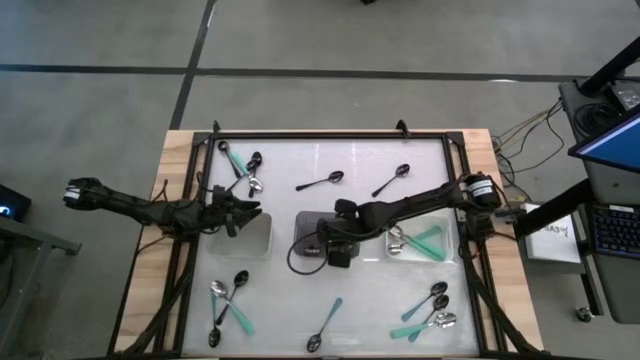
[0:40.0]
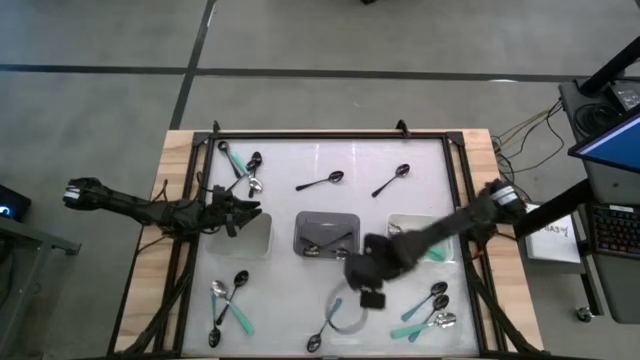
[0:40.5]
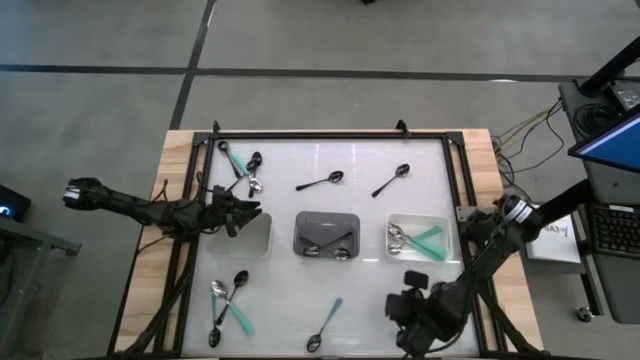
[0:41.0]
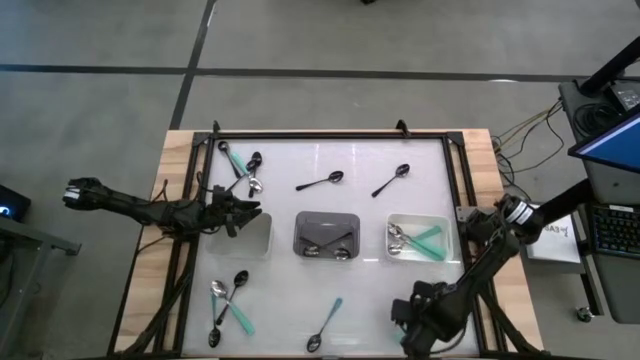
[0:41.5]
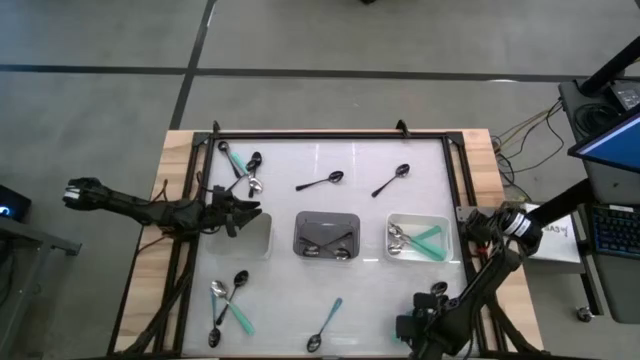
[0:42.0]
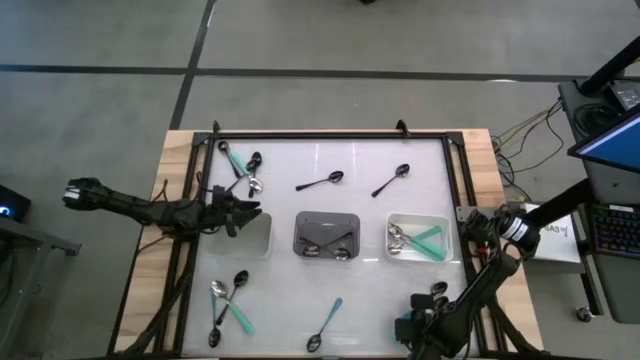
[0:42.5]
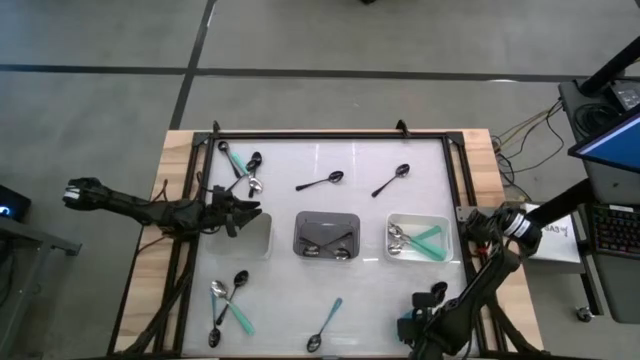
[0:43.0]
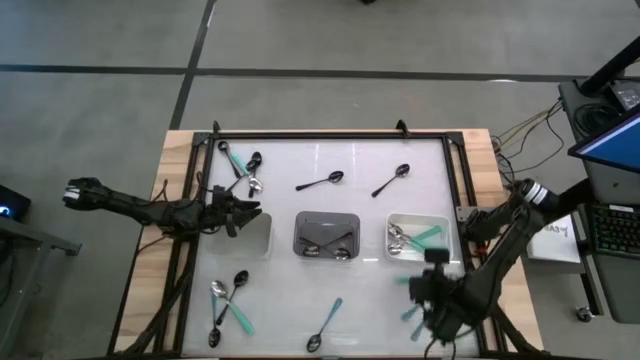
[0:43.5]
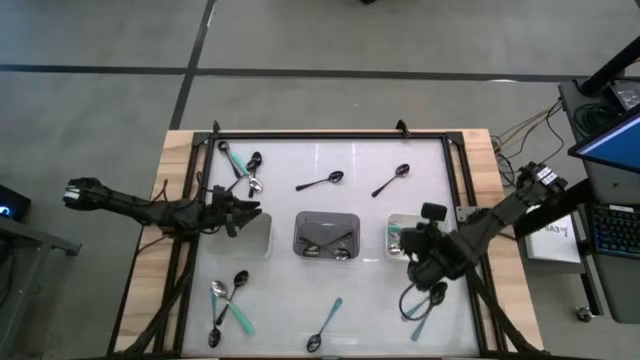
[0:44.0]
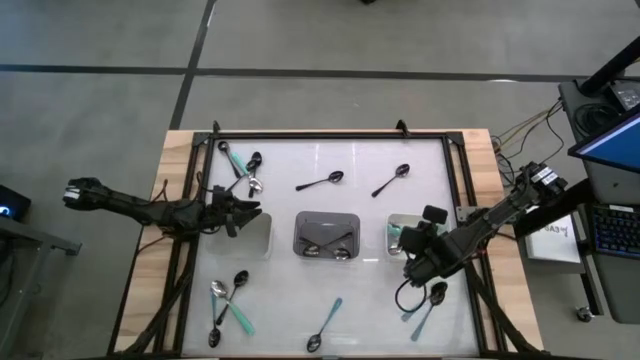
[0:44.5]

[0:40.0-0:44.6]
Task: Sort silverware by color (type)
Put the green spoon into the white

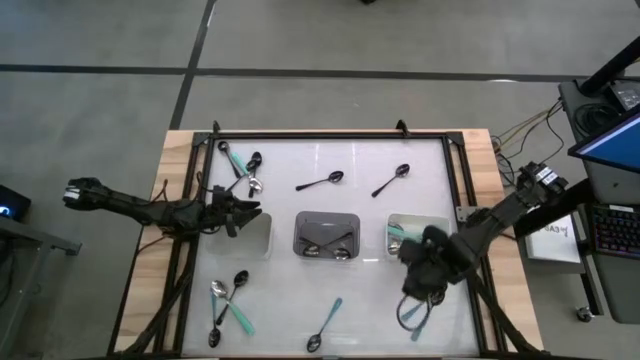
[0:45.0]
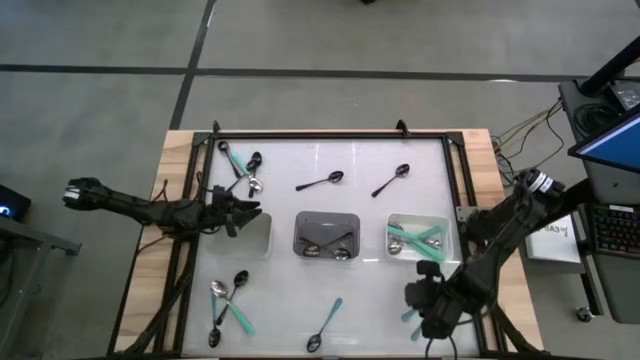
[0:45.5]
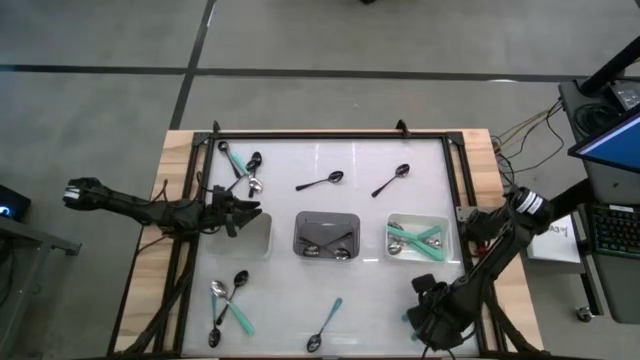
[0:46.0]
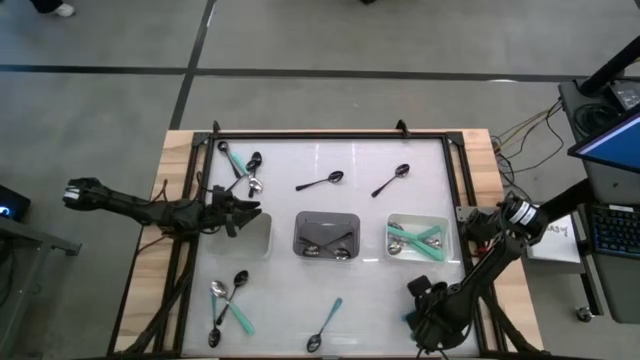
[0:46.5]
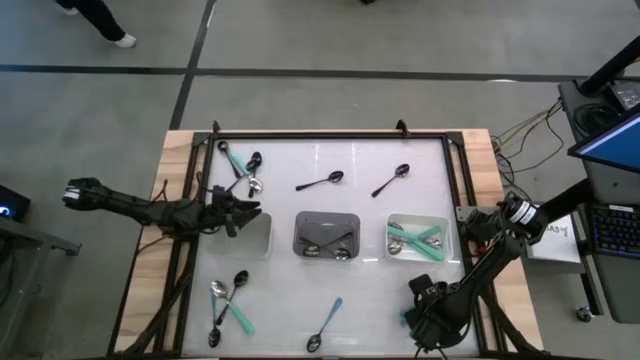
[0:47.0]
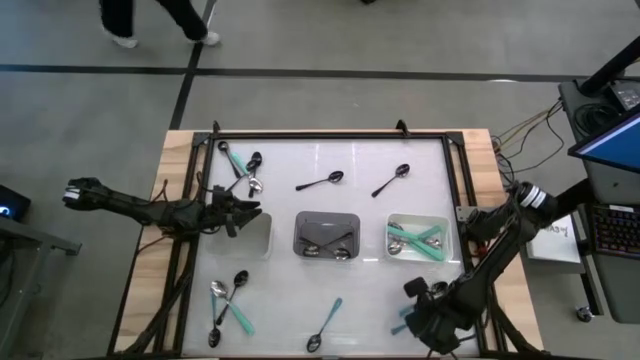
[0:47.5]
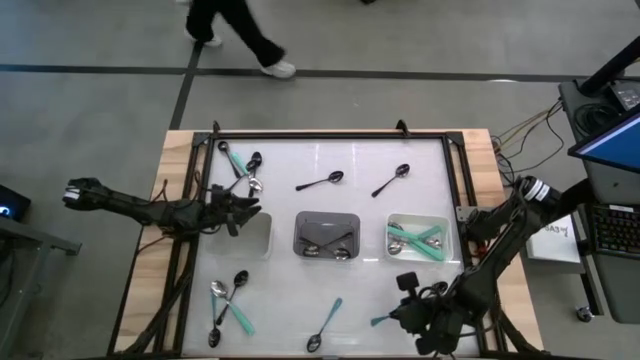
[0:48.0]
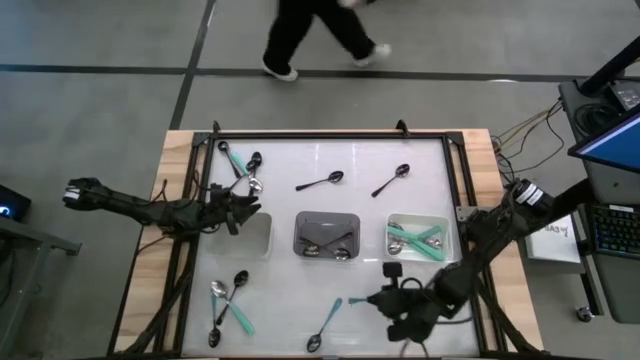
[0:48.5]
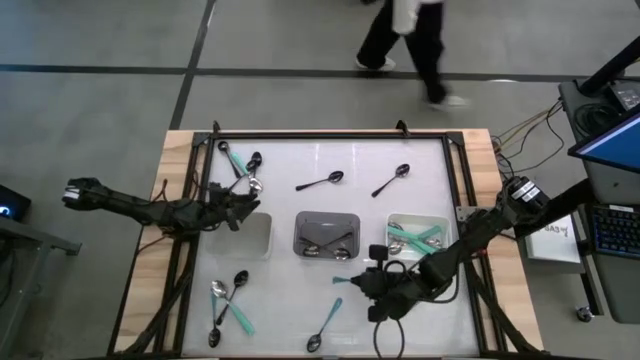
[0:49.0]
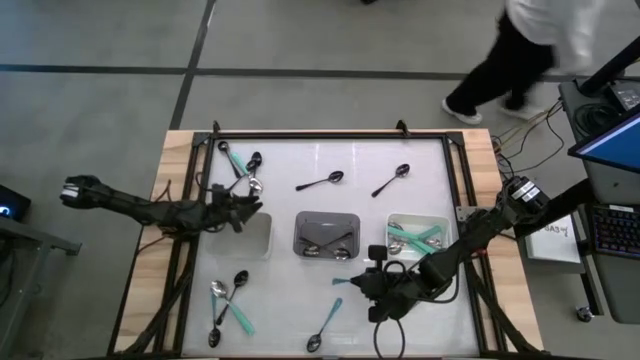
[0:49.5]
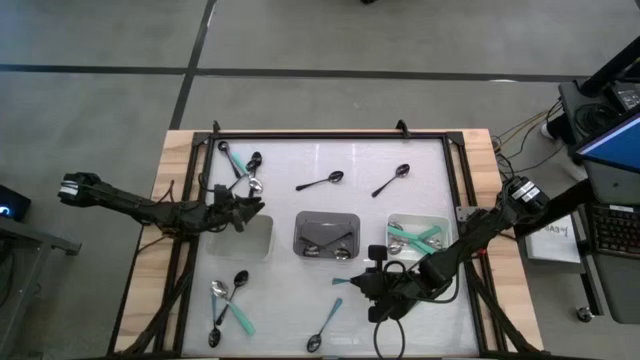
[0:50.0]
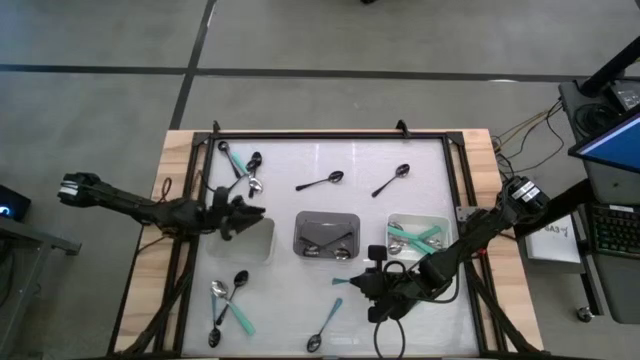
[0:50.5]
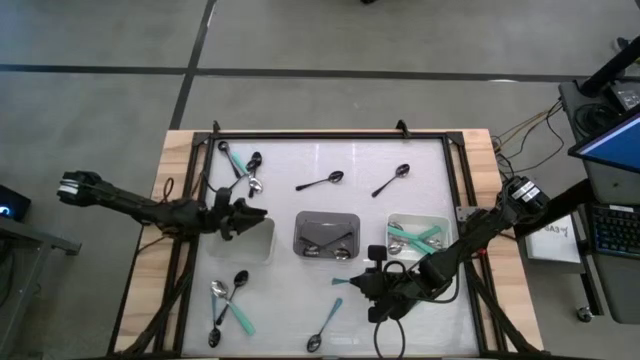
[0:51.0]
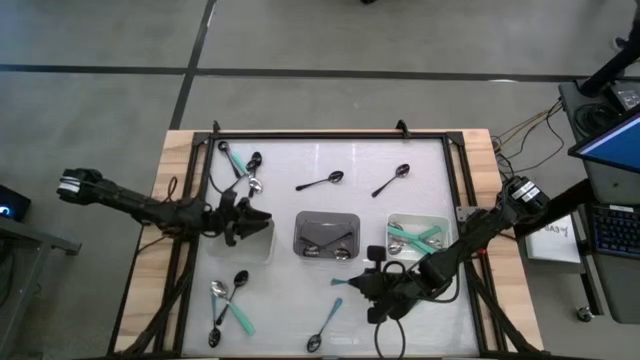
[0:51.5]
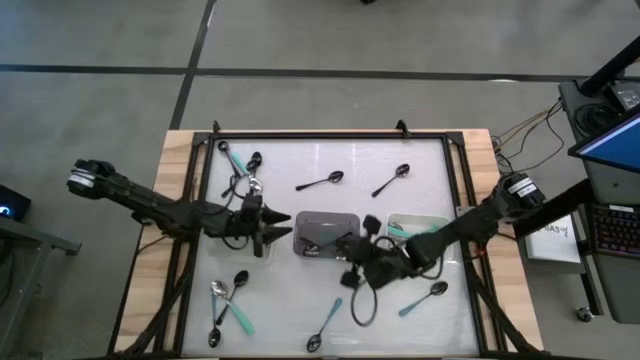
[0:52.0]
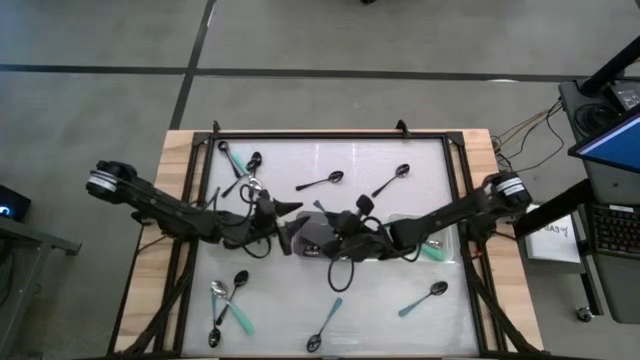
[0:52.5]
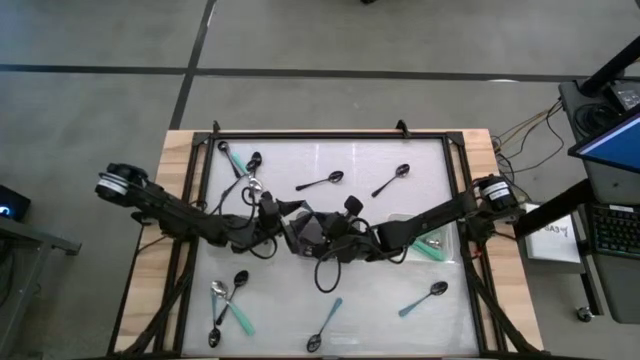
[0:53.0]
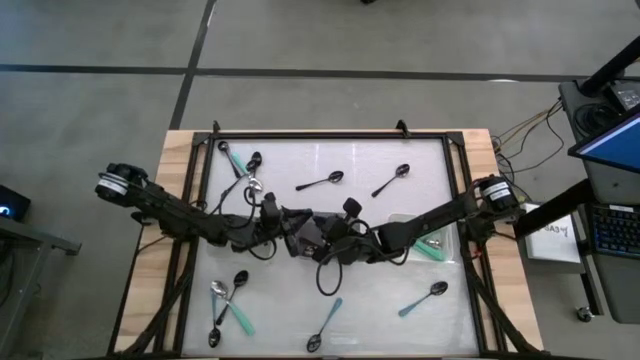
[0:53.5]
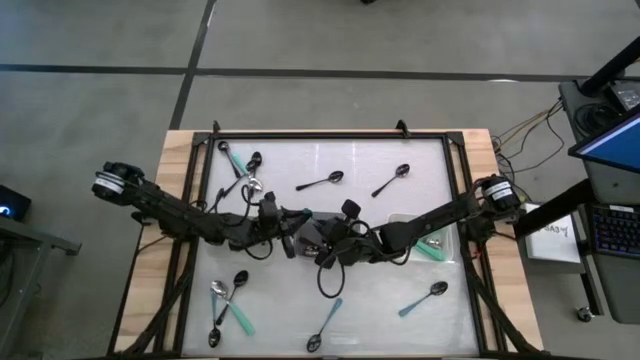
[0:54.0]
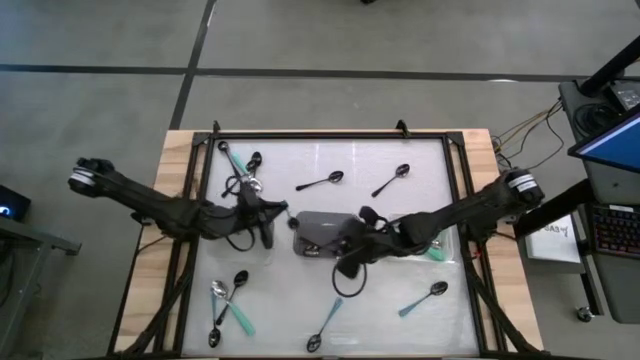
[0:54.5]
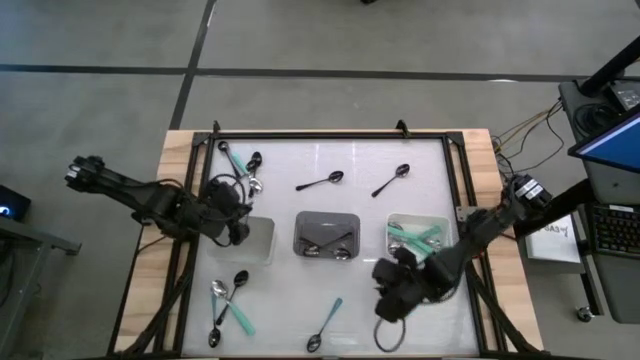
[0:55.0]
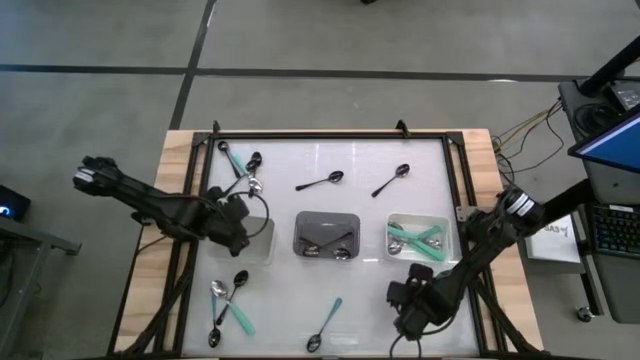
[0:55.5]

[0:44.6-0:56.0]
Put the blue spoon into the gray bin

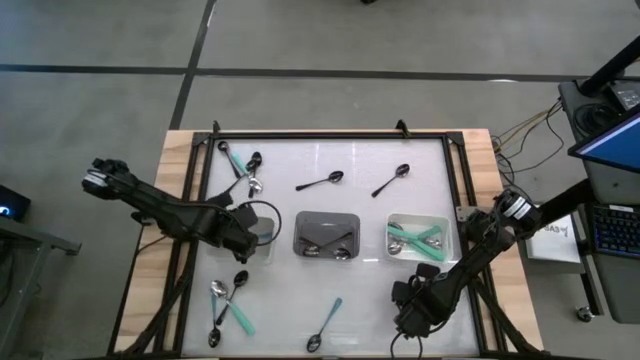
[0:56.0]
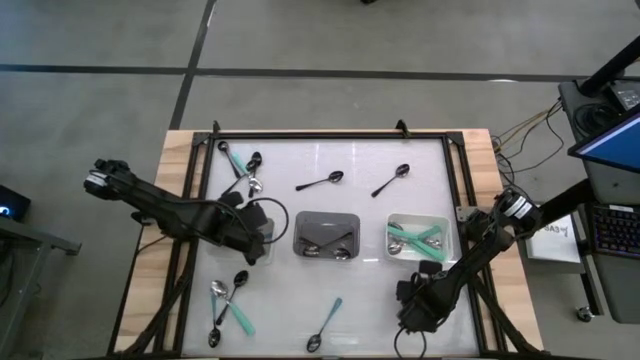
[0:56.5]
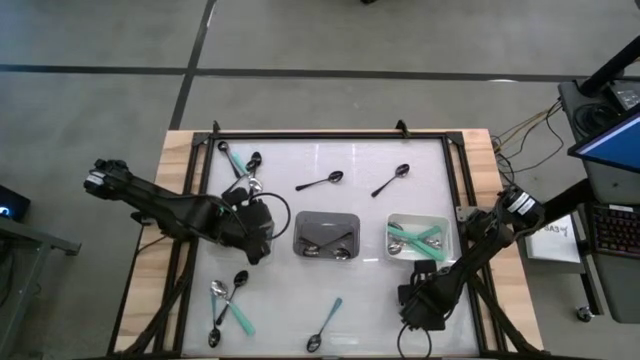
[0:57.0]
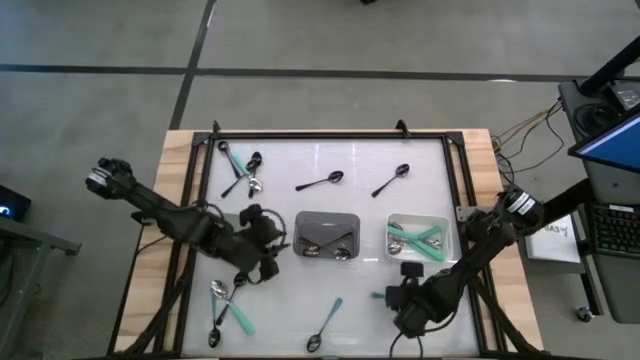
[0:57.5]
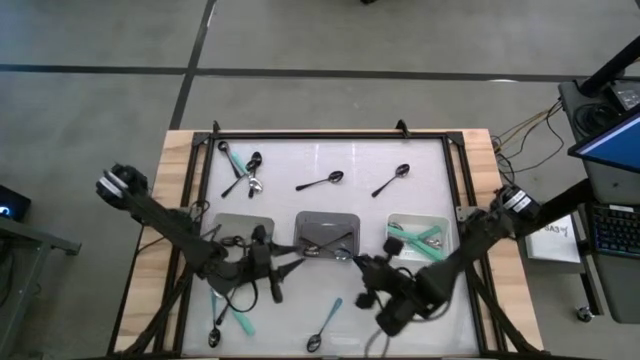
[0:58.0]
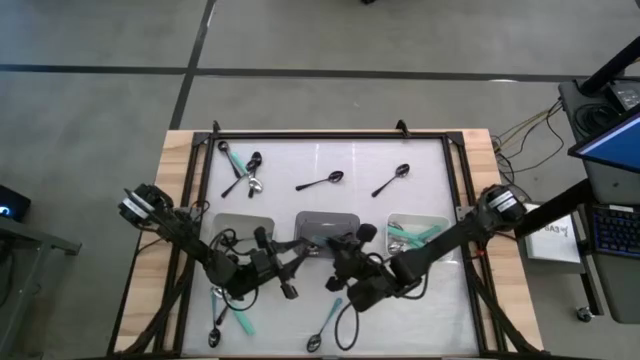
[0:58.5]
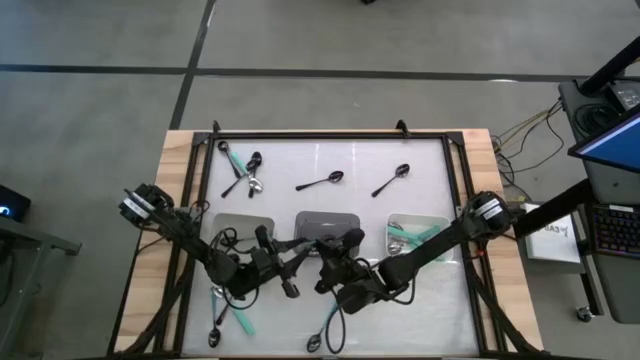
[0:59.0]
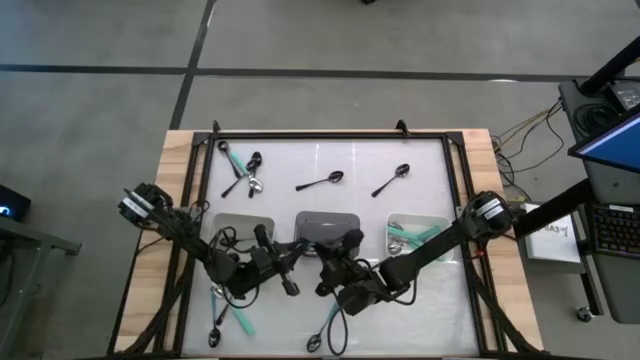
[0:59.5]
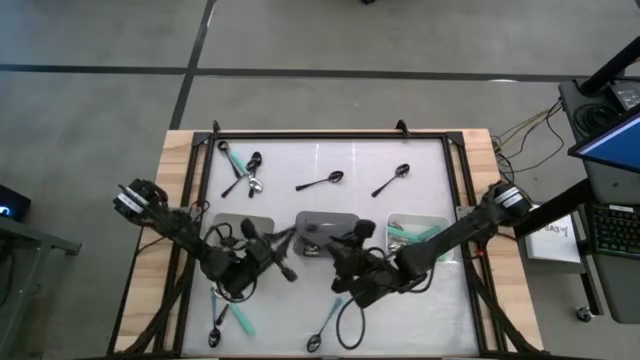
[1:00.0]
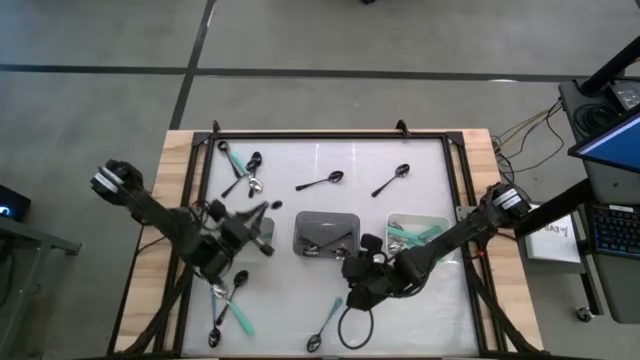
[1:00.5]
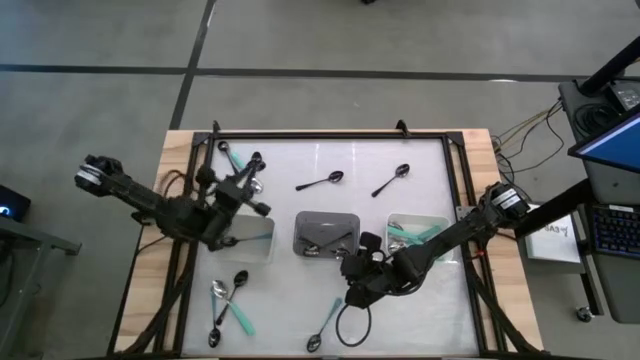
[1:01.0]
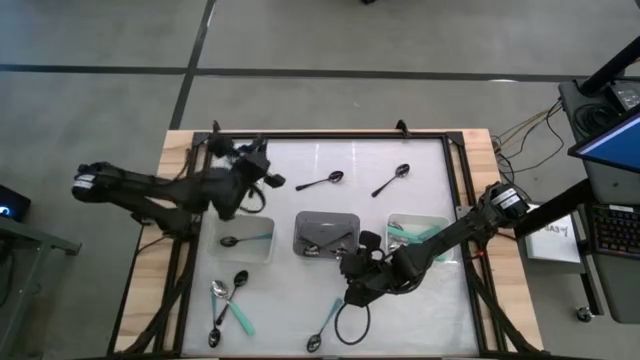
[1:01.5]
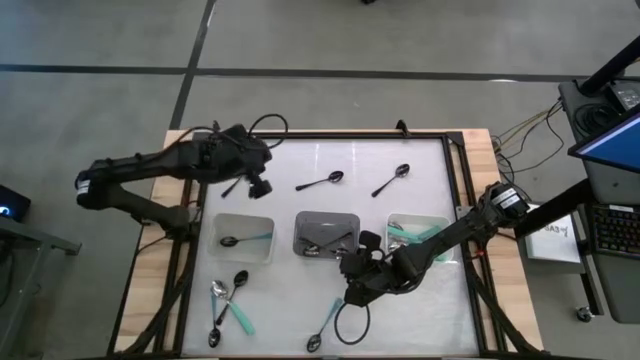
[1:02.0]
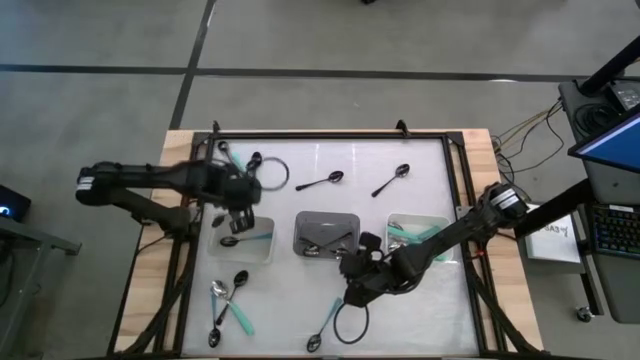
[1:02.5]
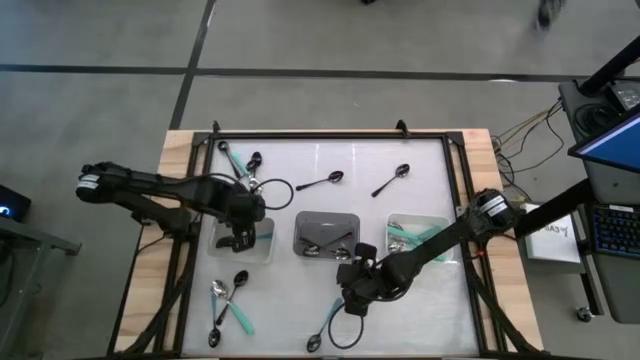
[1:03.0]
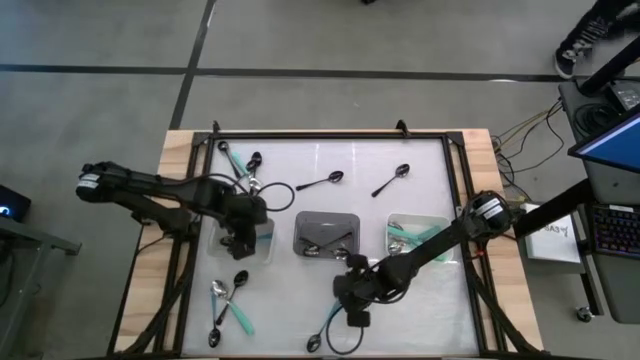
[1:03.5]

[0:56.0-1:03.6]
Put the blue spoon into the gray bin
